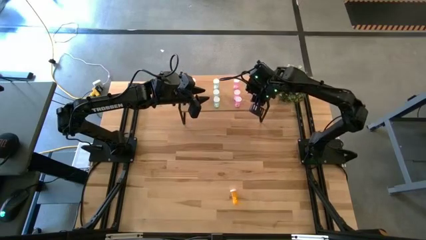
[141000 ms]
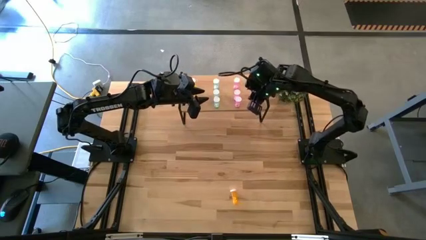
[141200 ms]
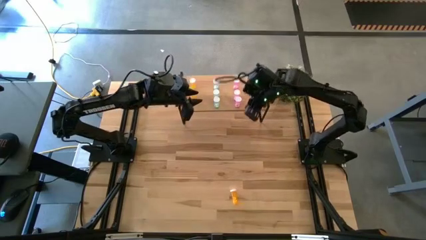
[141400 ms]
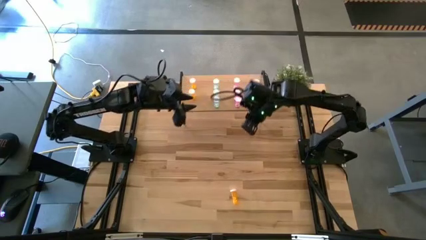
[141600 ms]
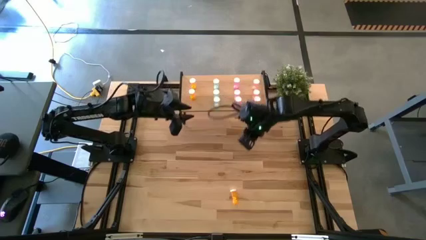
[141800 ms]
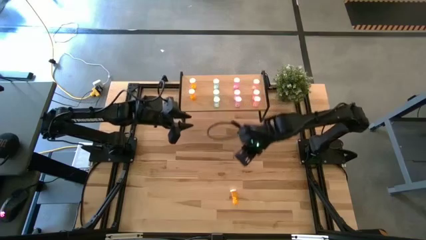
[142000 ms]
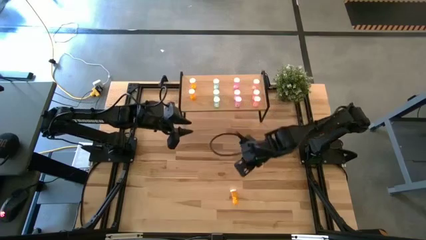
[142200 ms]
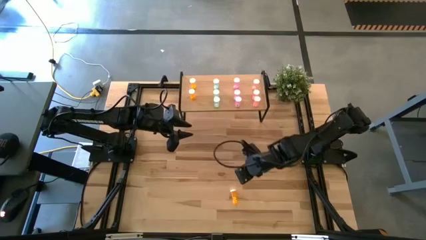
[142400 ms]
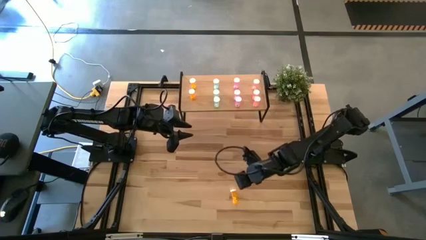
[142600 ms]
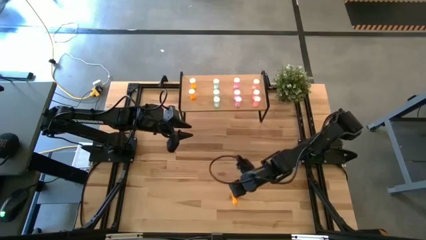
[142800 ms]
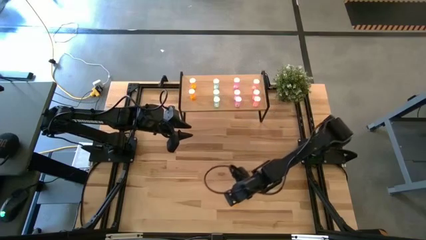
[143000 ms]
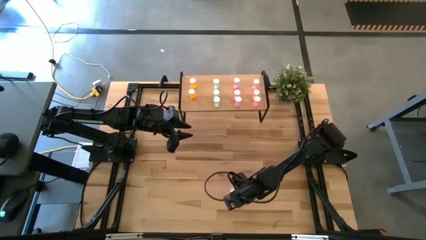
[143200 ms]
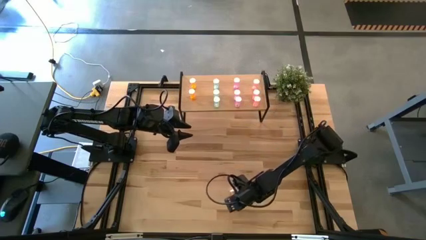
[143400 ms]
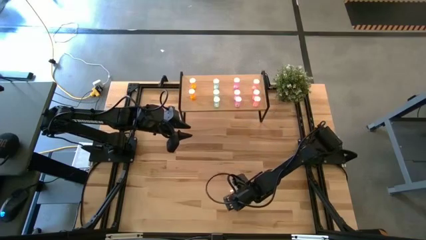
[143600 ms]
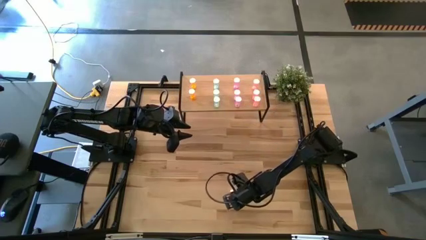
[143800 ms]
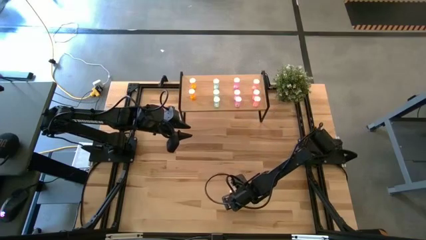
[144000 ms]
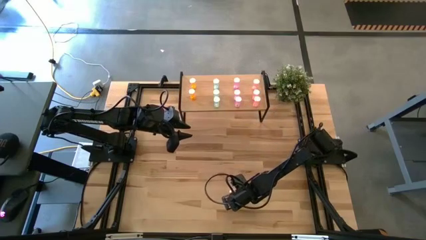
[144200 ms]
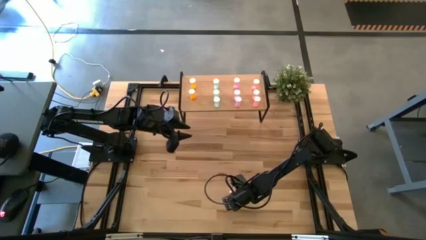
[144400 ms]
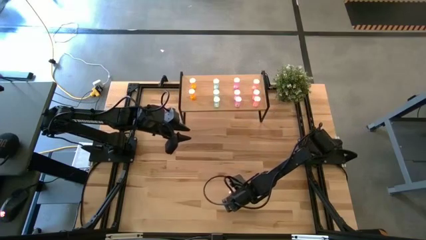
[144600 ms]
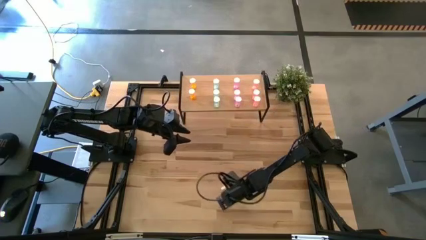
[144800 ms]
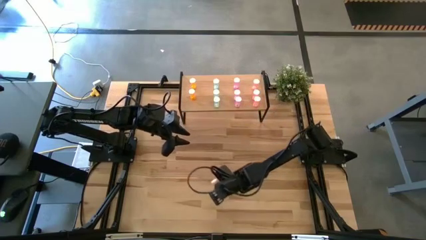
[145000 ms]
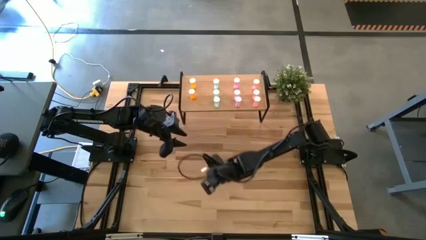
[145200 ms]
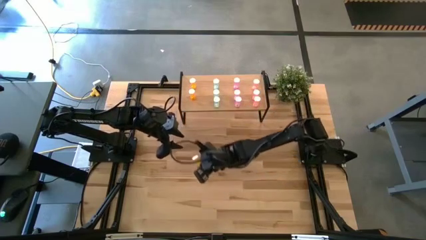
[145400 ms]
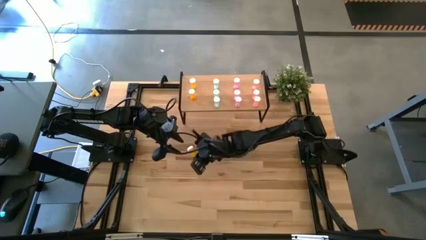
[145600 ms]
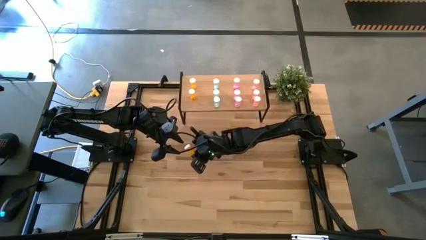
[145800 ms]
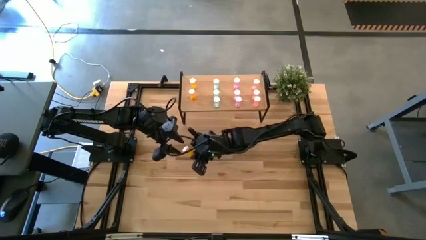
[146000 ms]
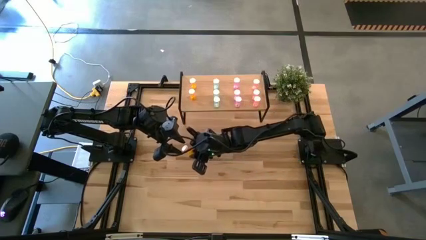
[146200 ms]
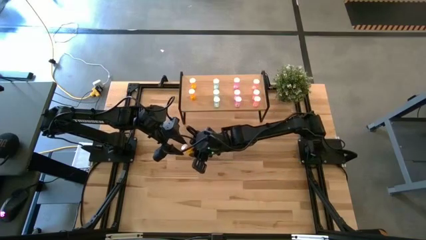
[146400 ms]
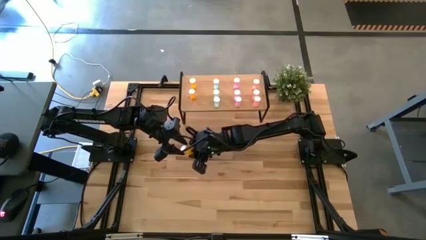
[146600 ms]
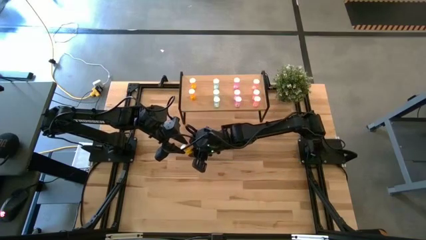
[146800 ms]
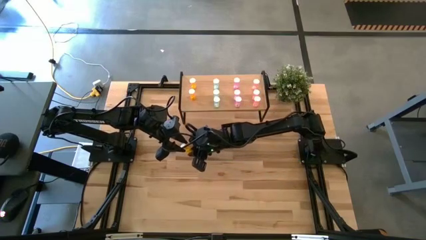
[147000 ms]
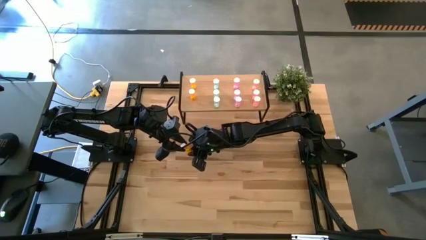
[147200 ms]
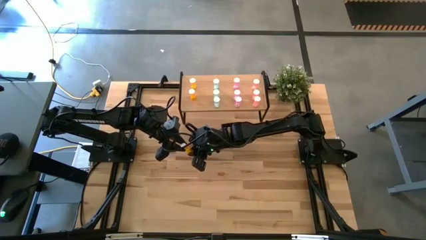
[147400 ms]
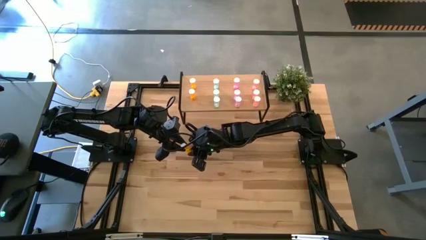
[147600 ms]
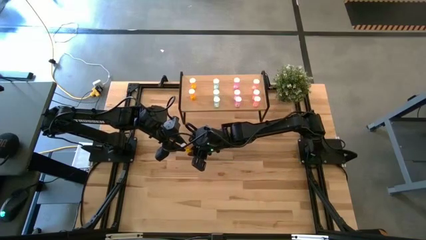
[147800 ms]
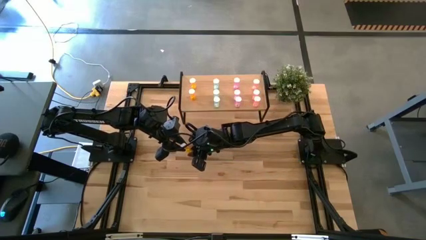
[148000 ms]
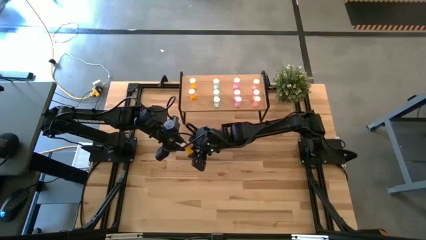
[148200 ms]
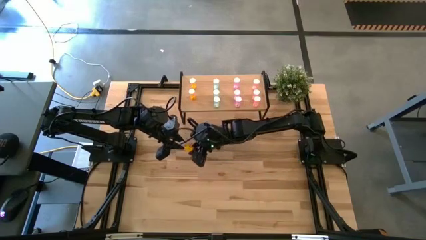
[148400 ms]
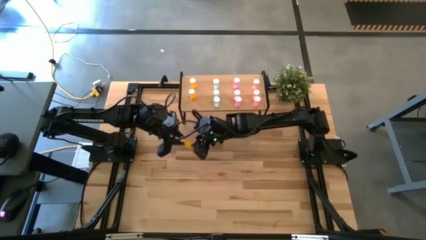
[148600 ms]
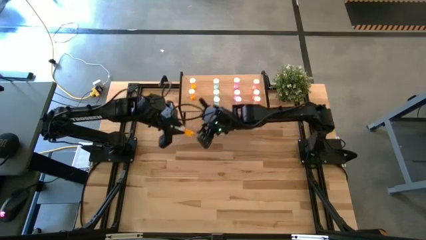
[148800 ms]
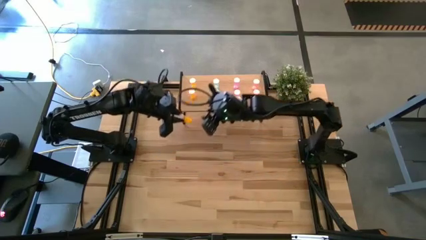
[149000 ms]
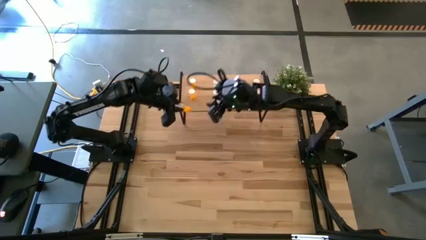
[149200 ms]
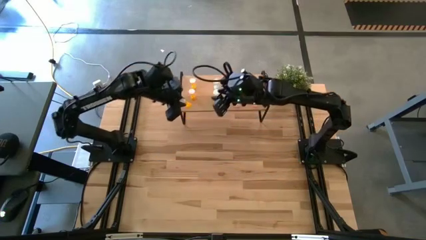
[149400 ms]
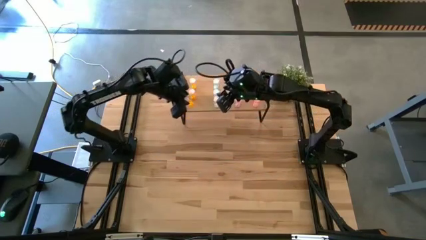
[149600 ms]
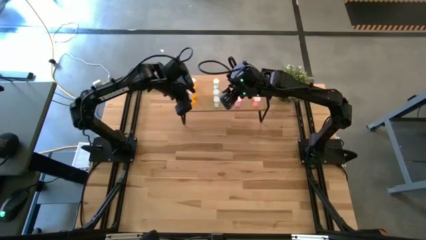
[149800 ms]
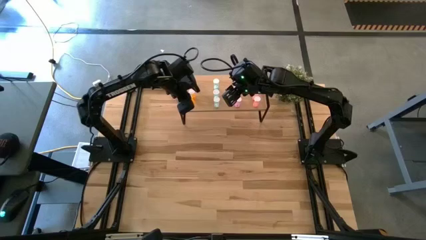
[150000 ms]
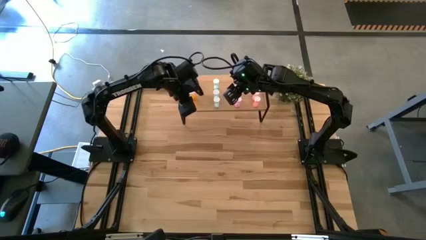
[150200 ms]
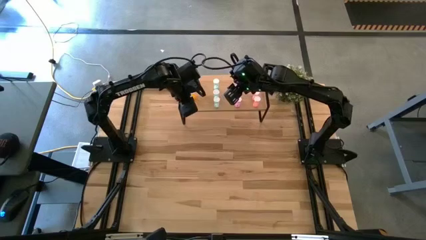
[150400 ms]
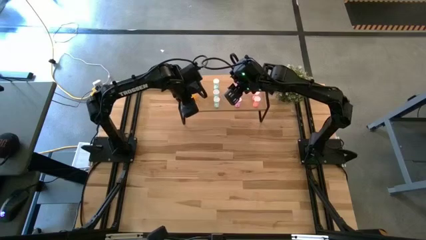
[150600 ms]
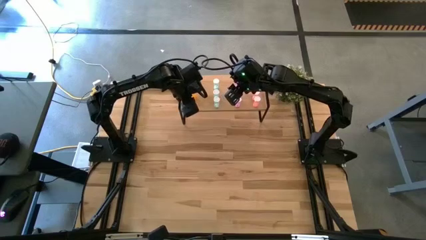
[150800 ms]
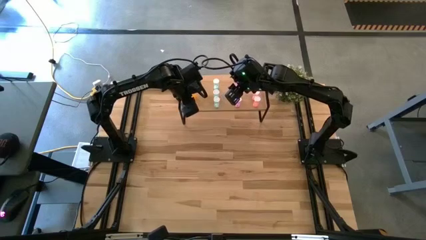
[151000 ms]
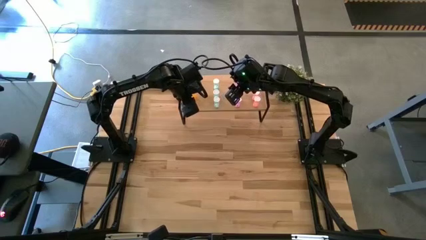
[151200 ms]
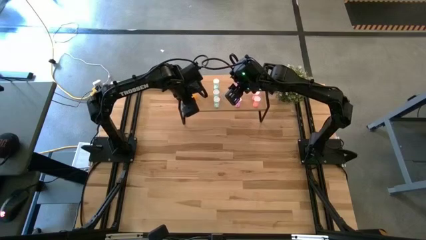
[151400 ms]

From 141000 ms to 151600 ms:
Task: Pick and place medicine bottles onto shelf by color
Put the orange pill bottle aligned with the other orange pill bottles

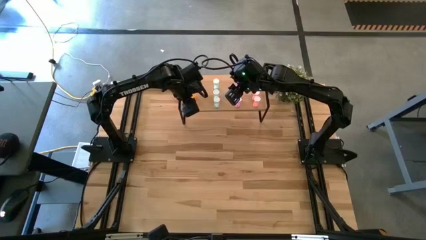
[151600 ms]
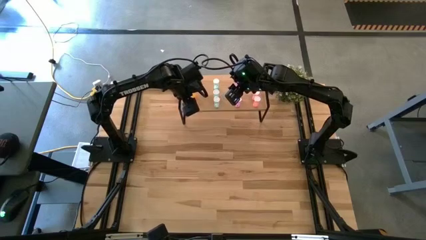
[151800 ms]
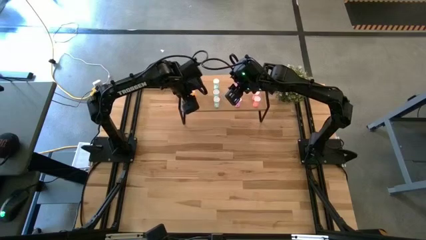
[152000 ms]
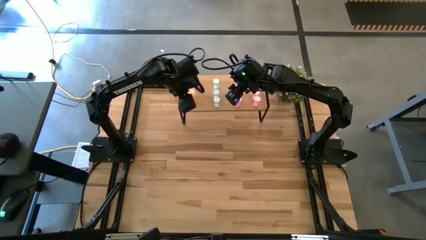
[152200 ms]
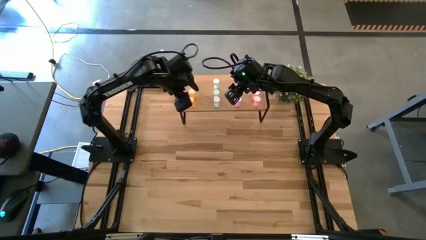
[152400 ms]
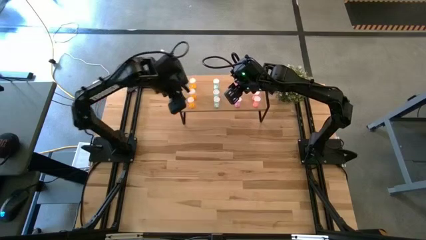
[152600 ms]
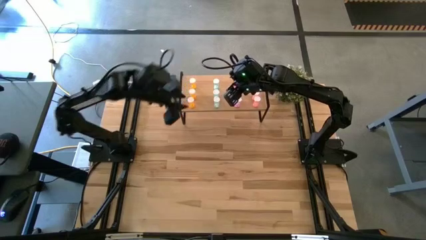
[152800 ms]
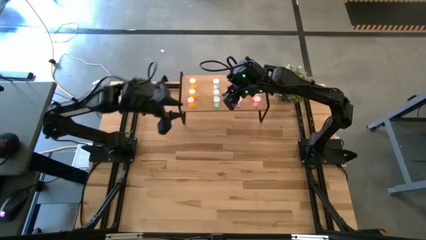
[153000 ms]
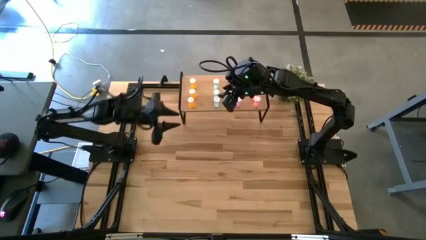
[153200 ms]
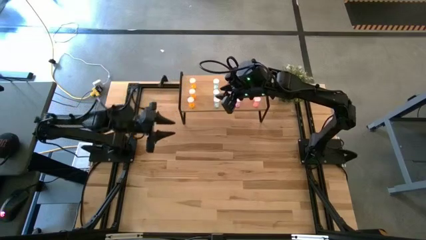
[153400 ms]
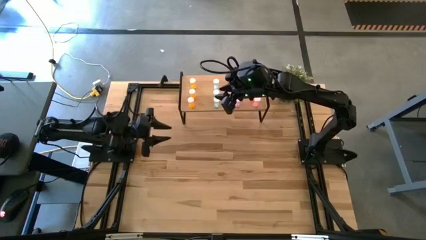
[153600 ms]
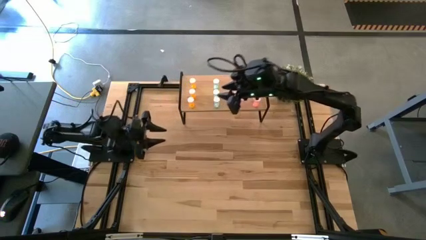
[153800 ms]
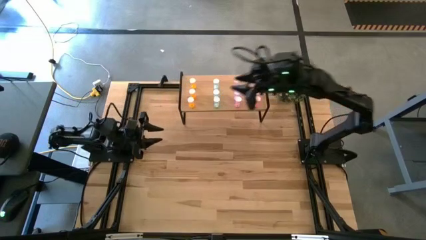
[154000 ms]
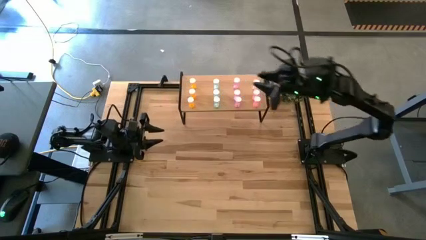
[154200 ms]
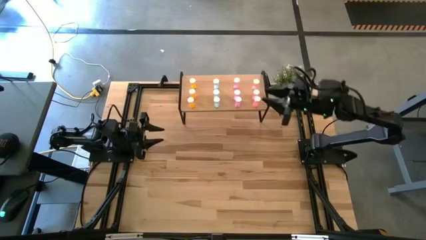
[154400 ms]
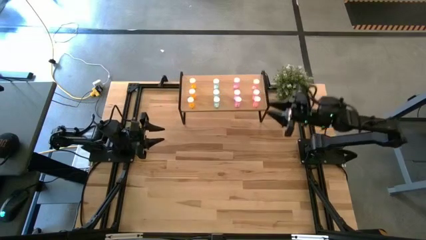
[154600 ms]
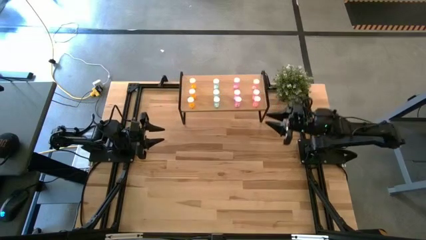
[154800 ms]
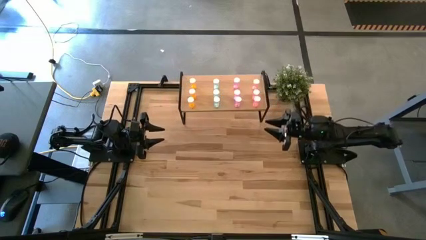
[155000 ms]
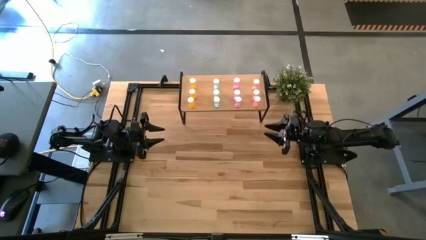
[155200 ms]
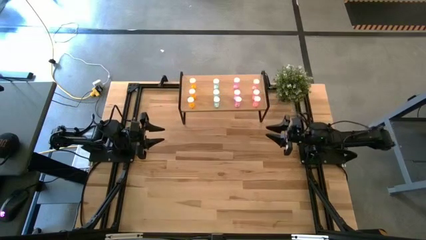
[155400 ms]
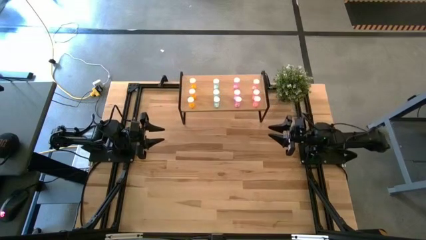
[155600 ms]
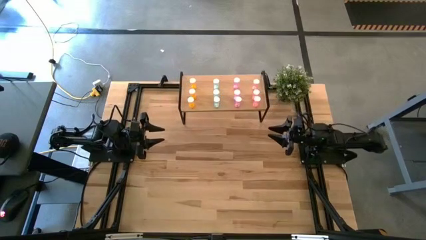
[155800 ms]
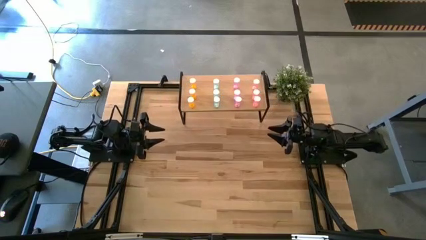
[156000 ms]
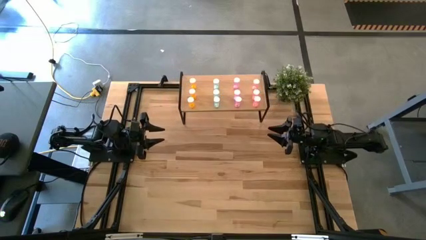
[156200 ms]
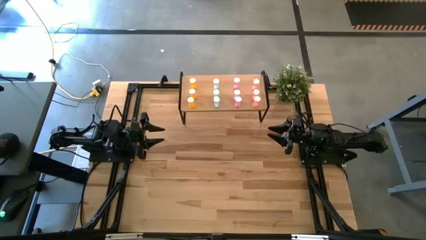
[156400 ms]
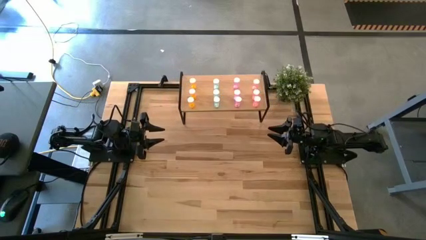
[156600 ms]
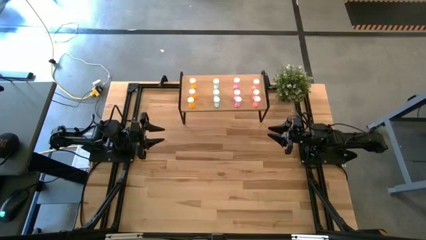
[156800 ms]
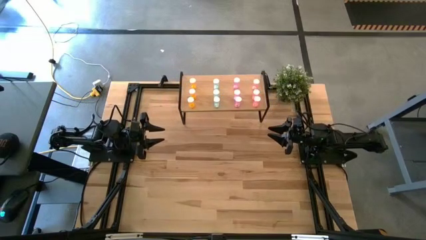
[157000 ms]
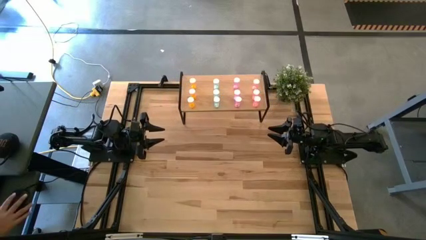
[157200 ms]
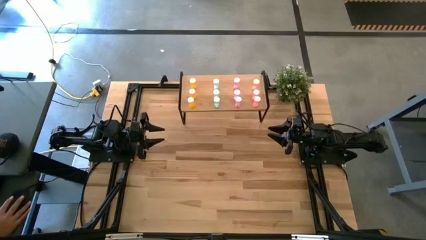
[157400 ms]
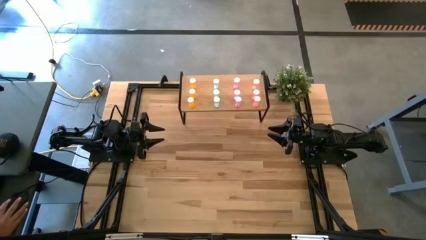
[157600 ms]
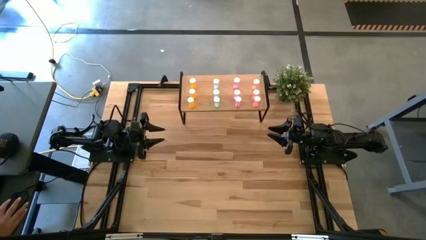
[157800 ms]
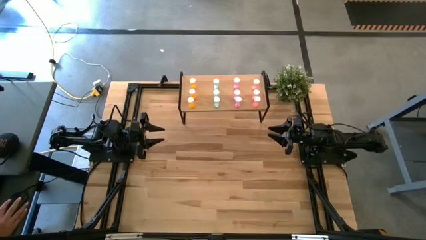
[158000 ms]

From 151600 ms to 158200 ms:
Return to Home Position
